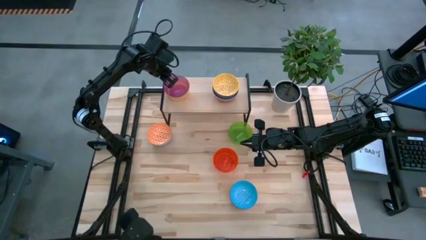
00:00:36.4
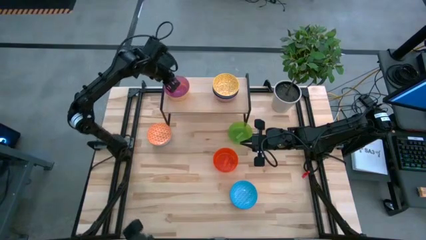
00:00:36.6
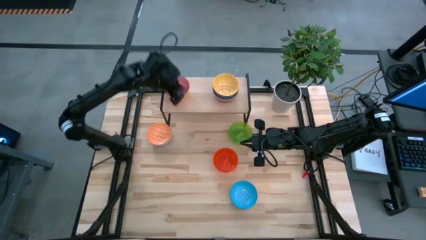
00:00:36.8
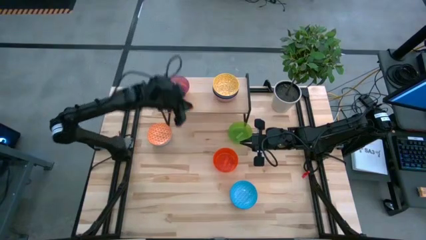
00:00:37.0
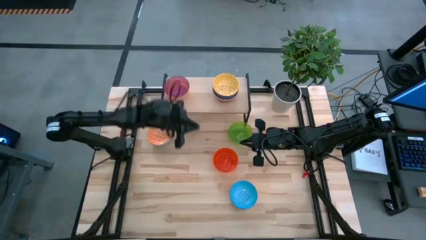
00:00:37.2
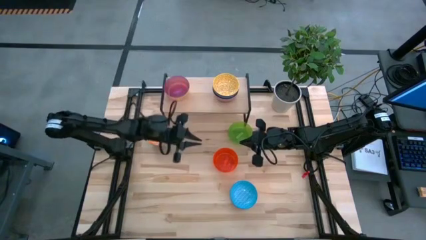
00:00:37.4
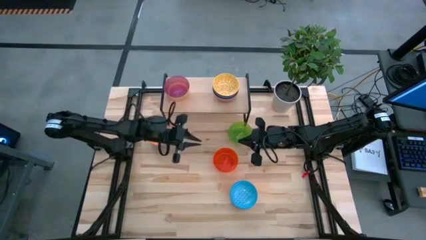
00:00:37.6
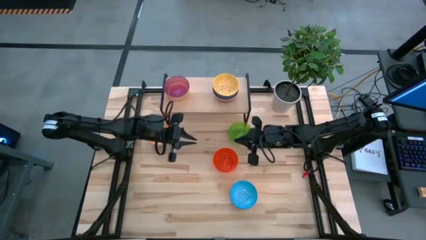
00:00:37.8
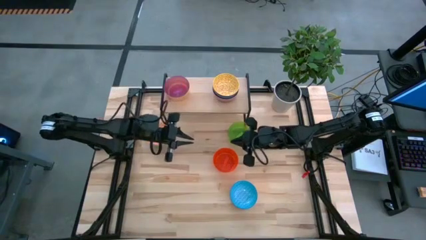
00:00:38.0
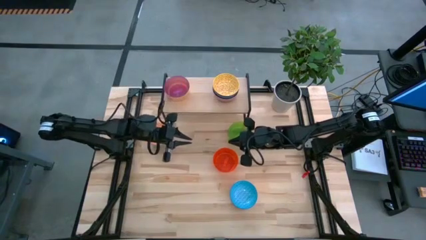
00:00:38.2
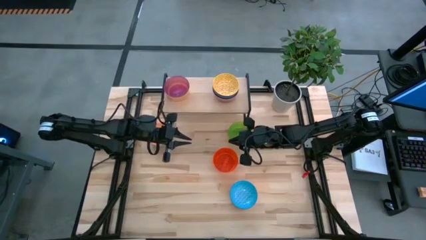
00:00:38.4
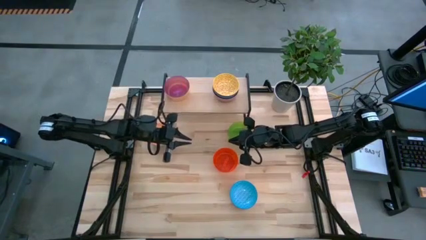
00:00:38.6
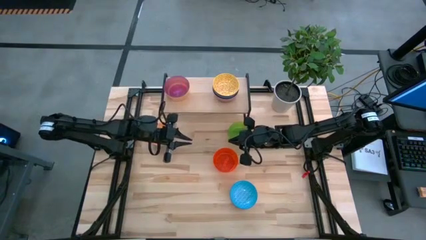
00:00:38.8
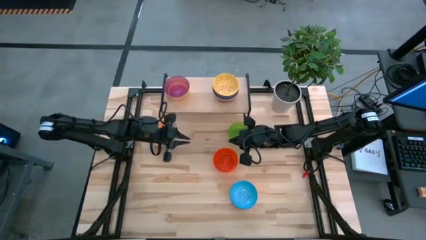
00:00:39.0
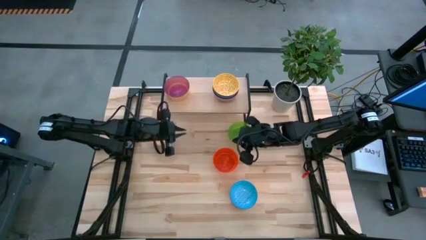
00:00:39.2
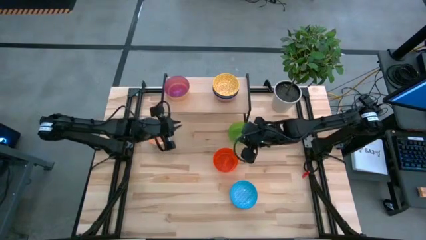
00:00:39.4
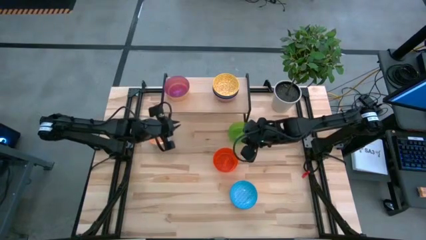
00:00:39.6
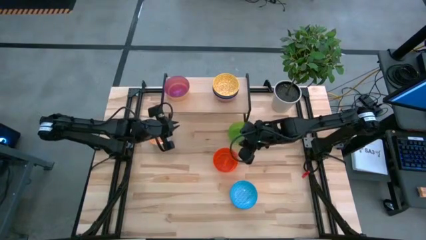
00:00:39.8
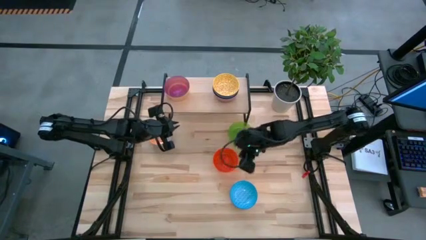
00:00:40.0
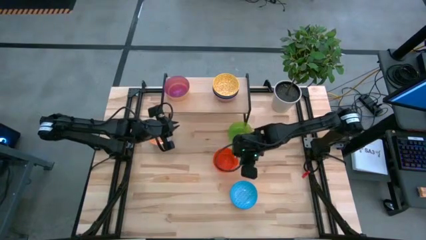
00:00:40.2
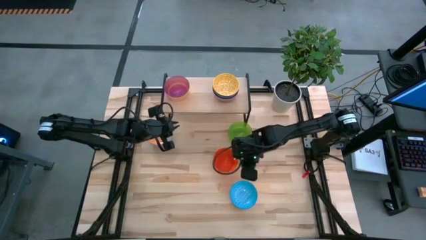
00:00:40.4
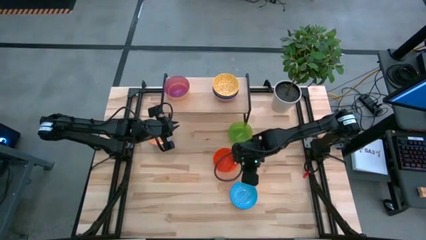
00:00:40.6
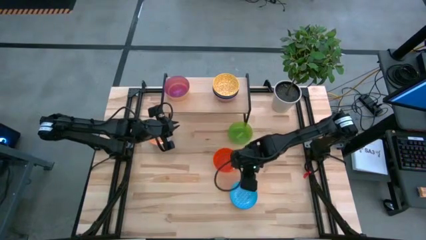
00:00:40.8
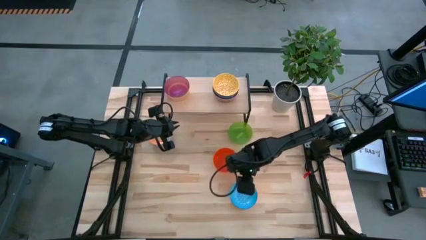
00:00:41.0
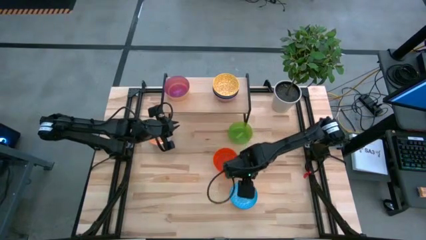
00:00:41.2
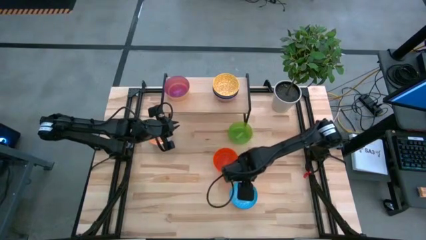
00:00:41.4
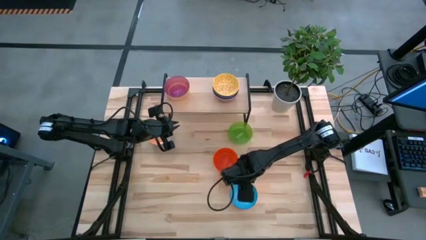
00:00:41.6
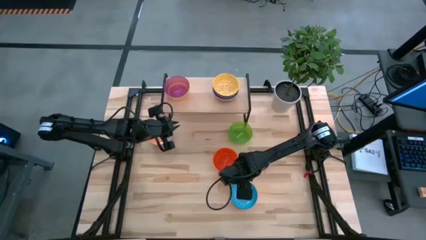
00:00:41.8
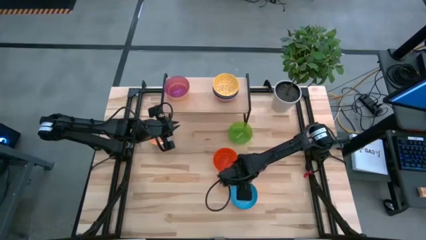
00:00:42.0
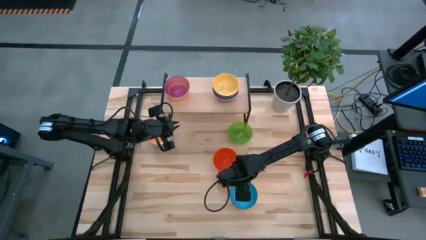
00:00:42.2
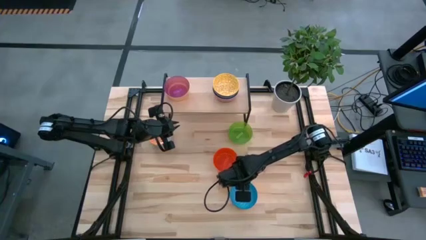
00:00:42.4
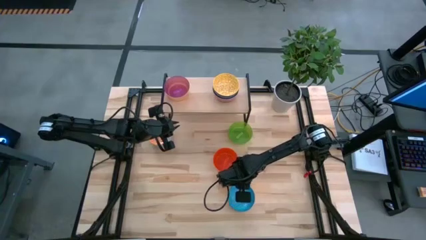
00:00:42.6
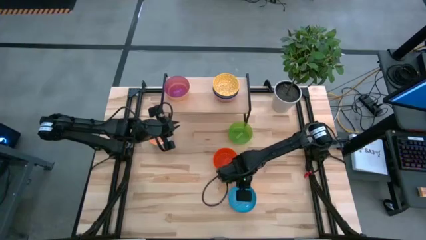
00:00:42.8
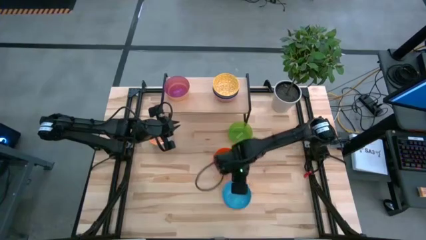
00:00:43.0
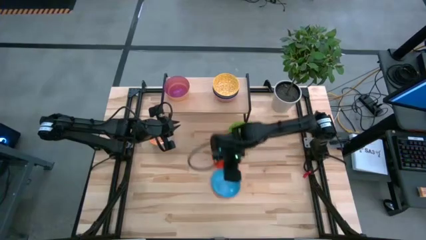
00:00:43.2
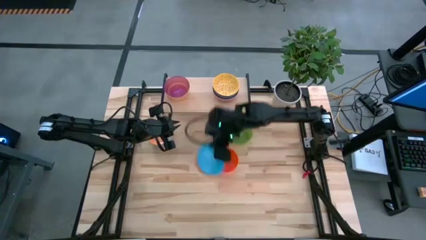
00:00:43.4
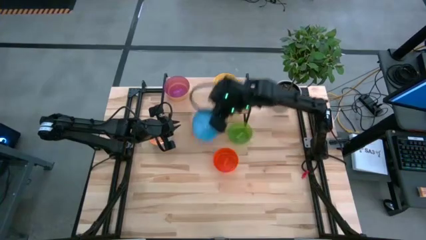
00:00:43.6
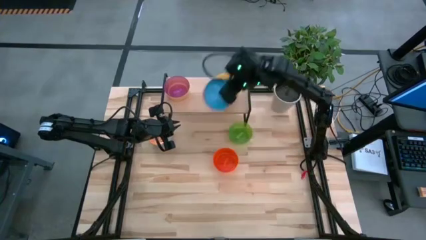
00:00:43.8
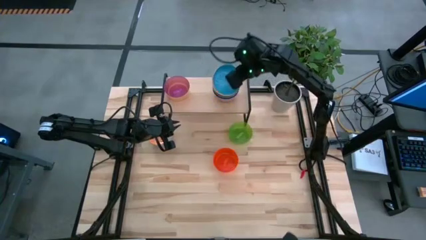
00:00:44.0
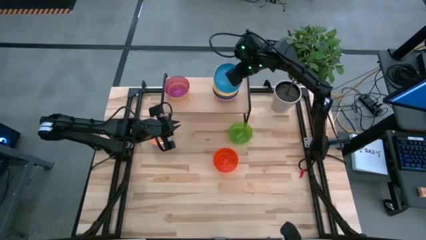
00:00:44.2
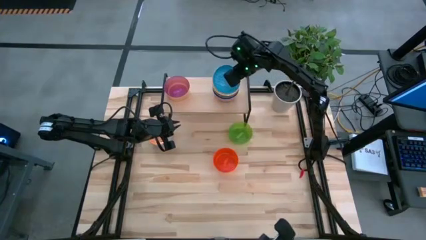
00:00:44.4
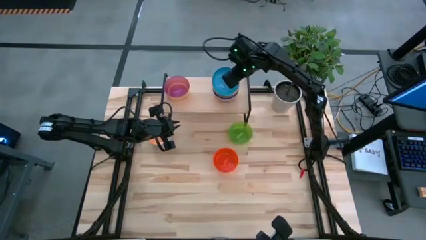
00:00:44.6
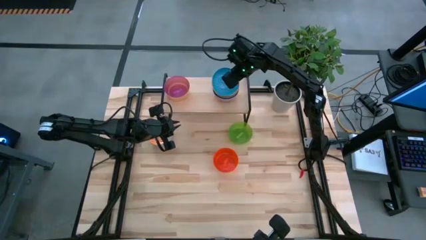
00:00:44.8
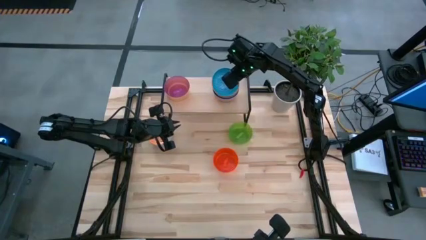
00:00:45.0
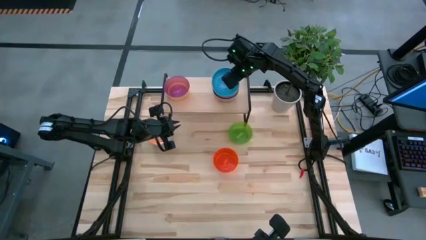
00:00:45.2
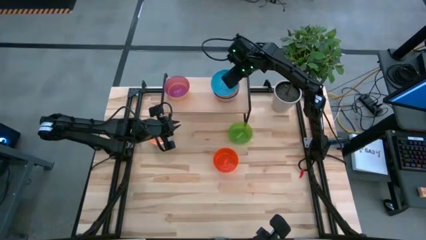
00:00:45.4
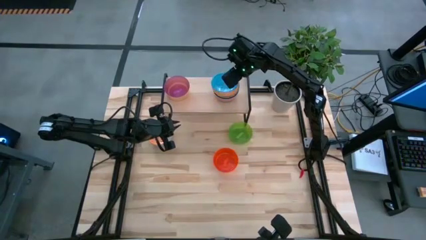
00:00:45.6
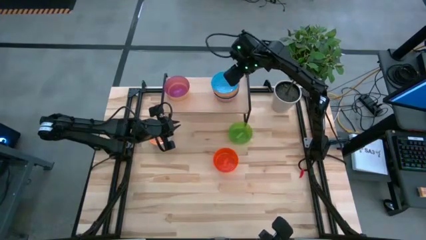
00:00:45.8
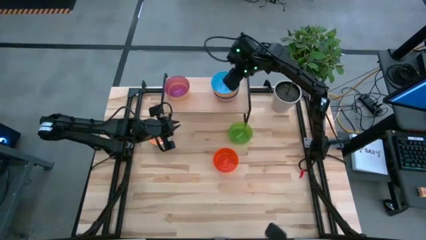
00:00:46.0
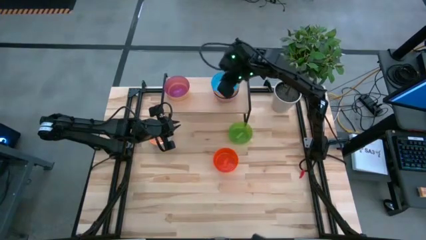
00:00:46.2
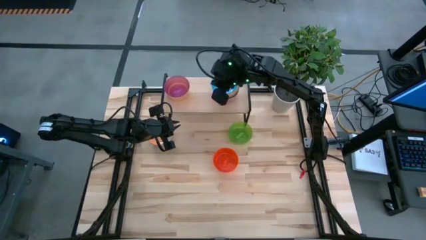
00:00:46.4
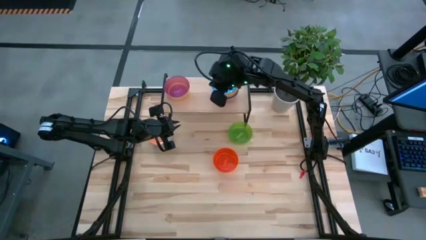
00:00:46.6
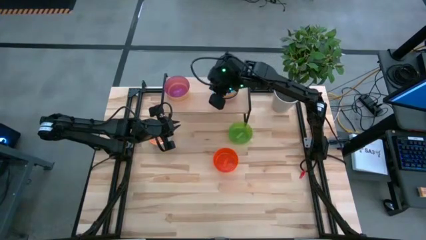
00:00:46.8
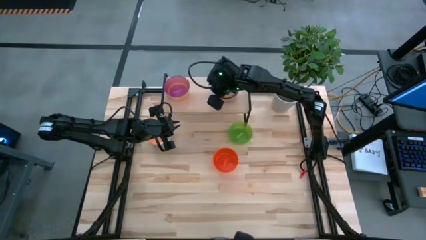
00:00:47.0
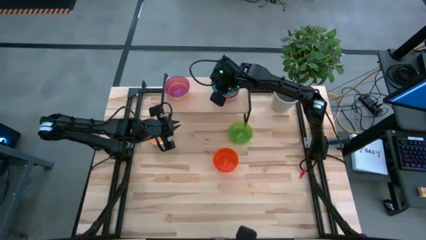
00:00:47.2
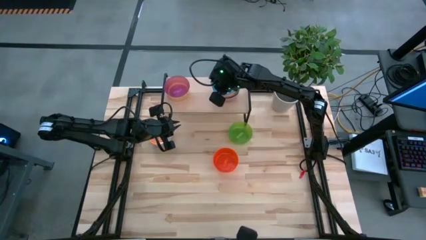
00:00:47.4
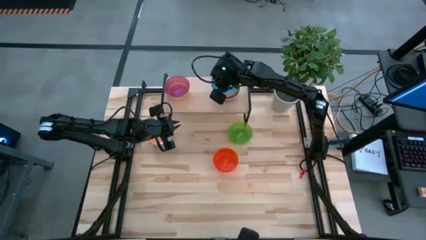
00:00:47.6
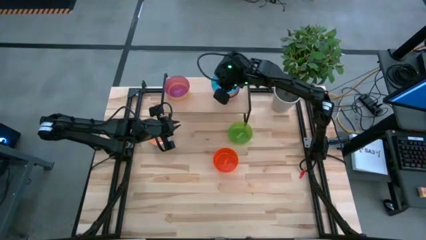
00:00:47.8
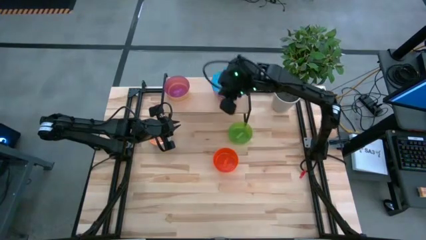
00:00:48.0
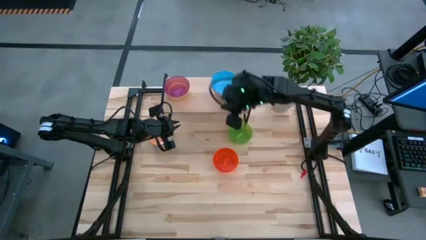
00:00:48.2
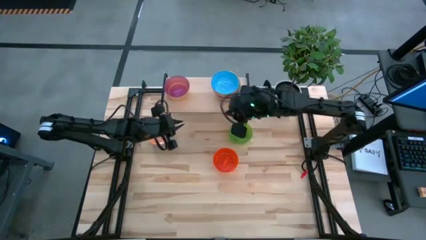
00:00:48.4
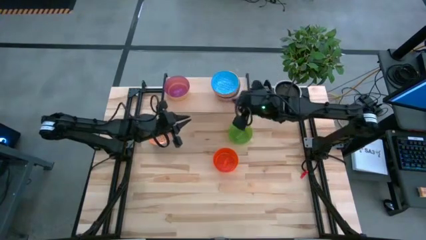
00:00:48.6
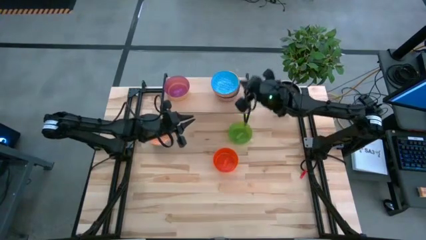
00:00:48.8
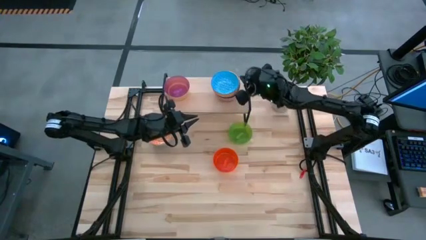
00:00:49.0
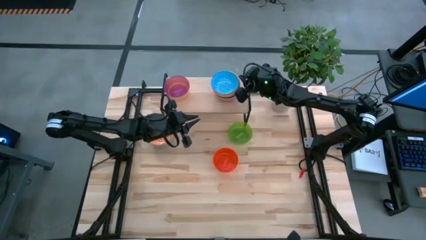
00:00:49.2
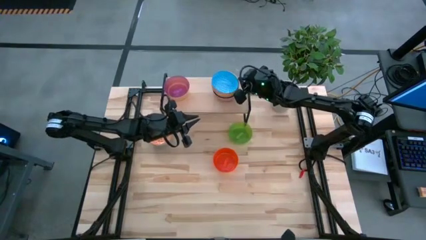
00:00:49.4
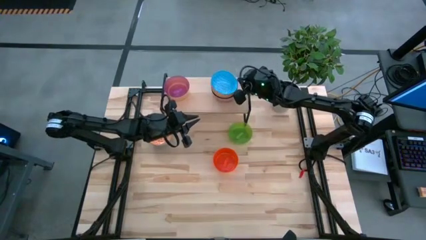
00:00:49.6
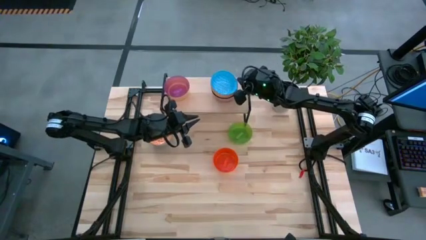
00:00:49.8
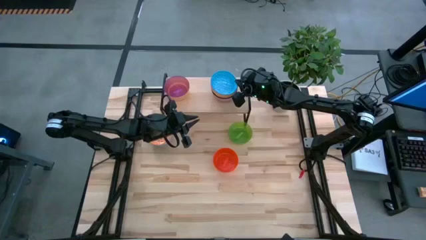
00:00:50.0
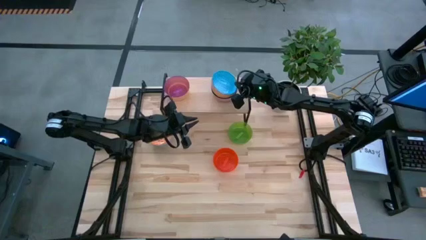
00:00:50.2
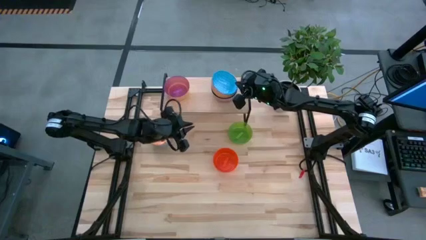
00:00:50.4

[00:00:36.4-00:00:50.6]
Task: Place and stack bowls onto a shelf
Stack the light blue patterned bowl on top of the yellow patterned bowl on the shelf

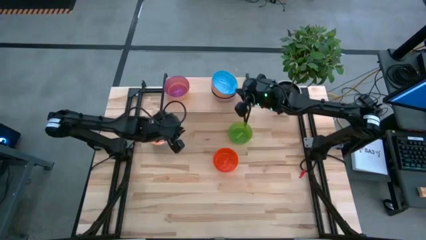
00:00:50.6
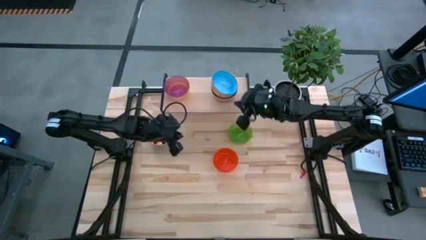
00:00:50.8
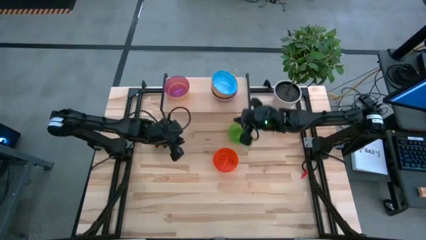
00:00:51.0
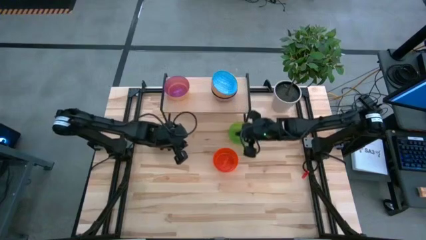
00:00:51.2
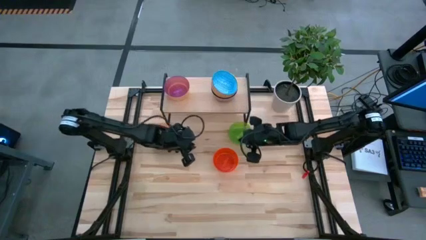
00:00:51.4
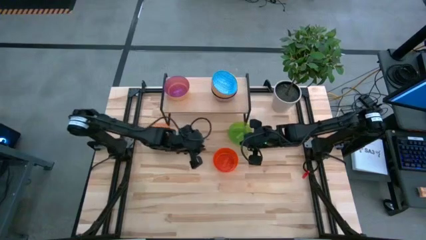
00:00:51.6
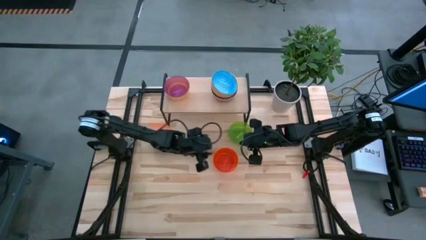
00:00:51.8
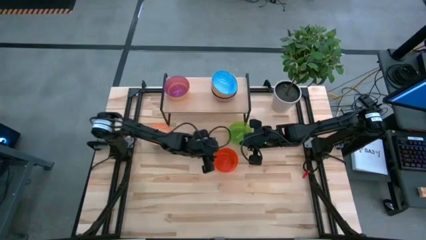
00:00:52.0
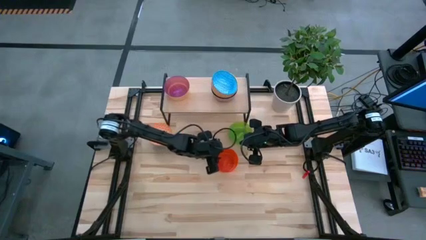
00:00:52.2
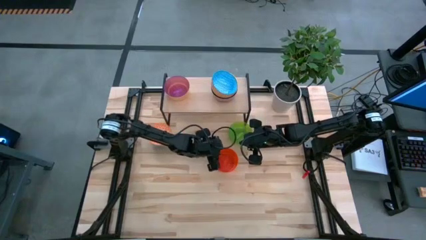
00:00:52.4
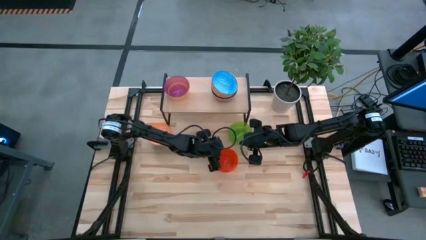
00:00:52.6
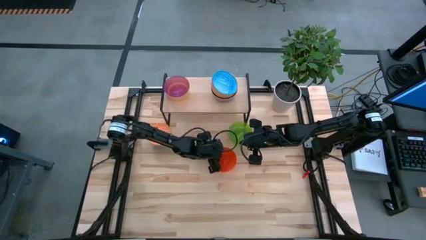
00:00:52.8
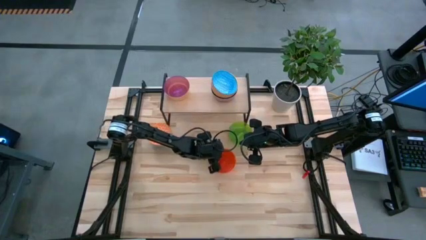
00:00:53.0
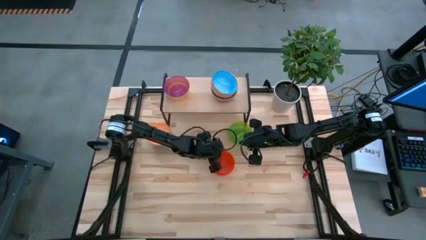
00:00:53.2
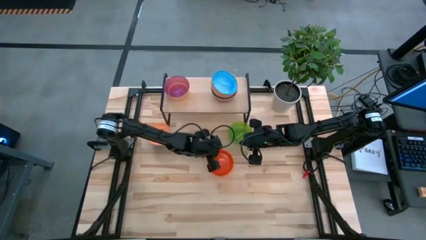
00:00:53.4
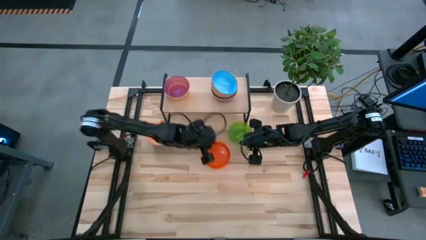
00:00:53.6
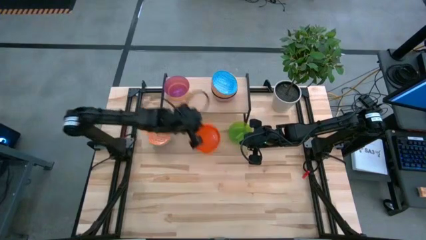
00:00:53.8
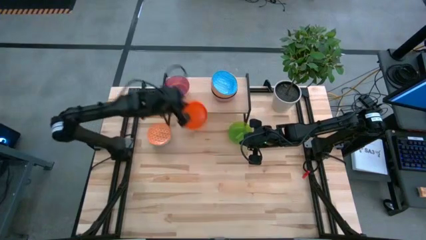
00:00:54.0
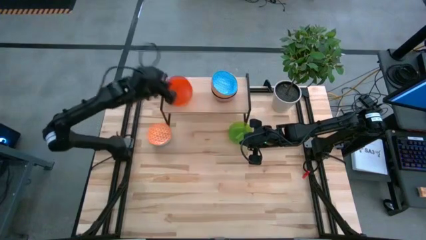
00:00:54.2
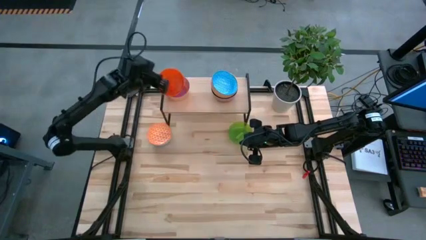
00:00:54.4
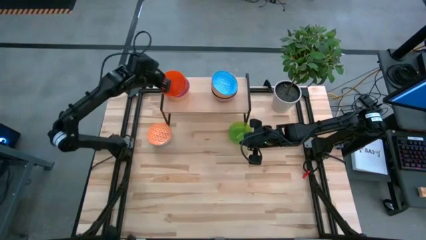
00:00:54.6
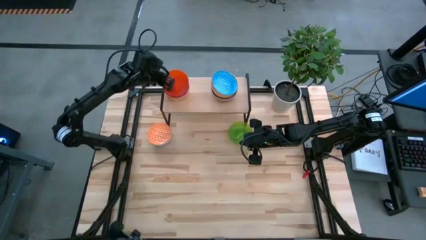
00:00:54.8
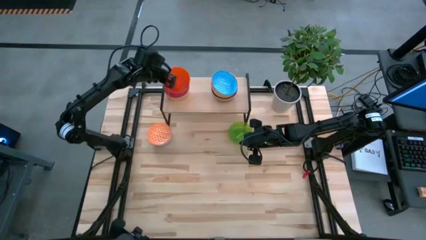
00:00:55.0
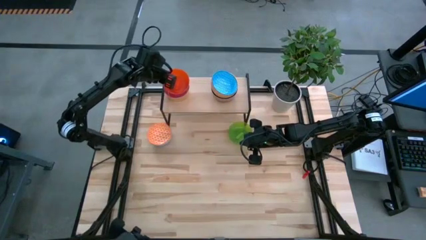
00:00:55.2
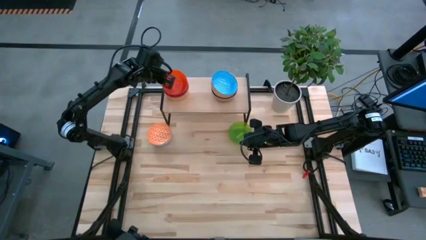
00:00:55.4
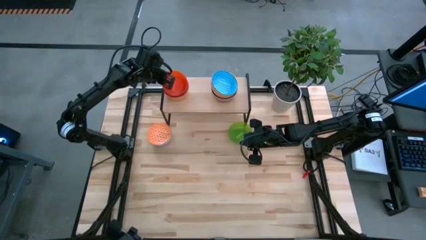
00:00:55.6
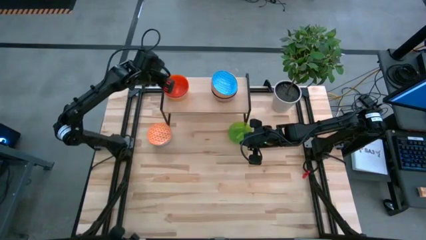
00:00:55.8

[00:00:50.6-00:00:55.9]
Stack the orange bowl on top of the violet bowl on the shelf
